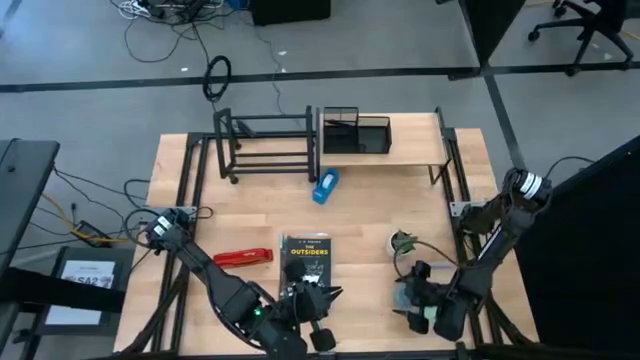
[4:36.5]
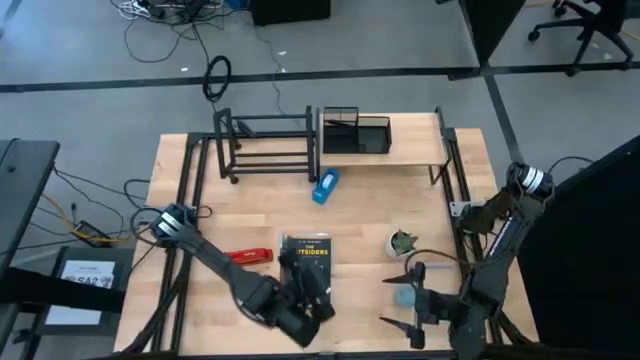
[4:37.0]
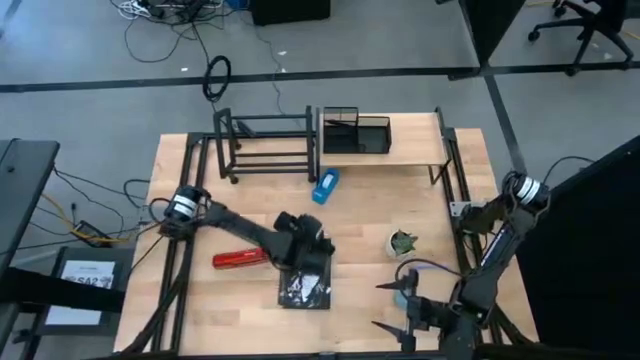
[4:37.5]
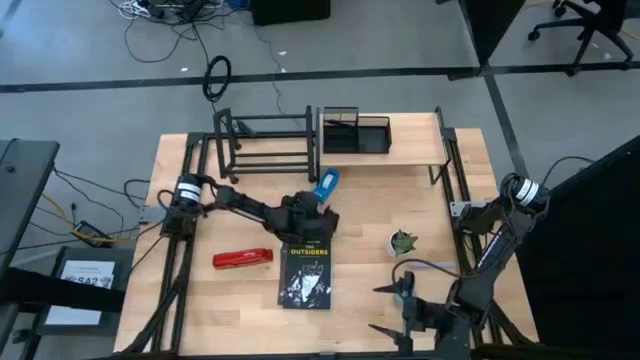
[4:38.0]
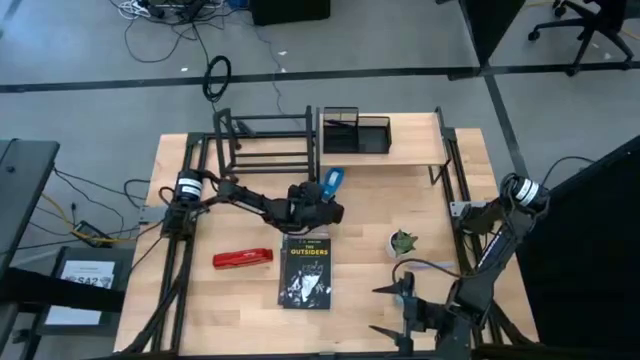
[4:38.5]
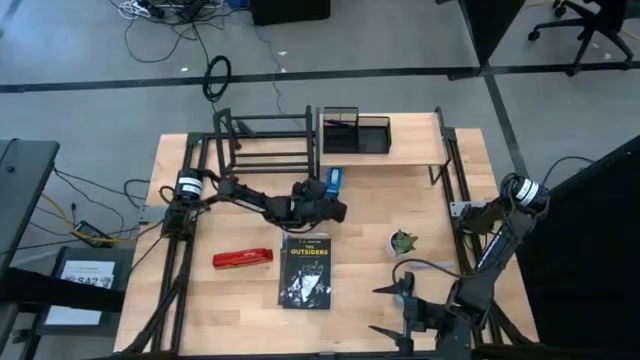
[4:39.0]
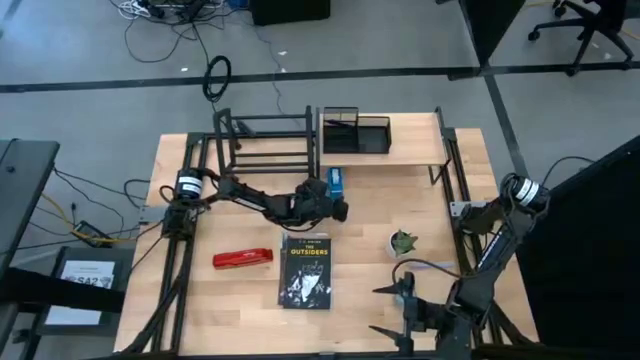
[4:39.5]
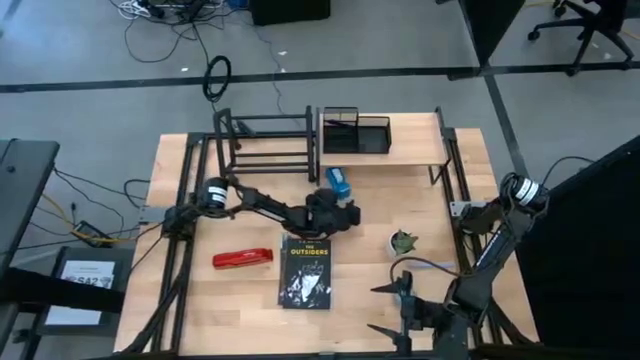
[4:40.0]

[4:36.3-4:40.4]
Task: Stock shelves
Remove the blue tape dispenser from under the shelf

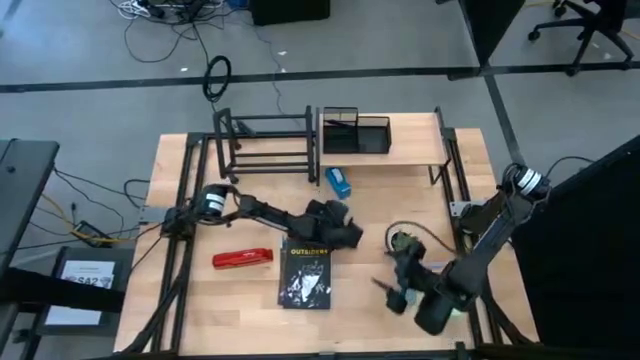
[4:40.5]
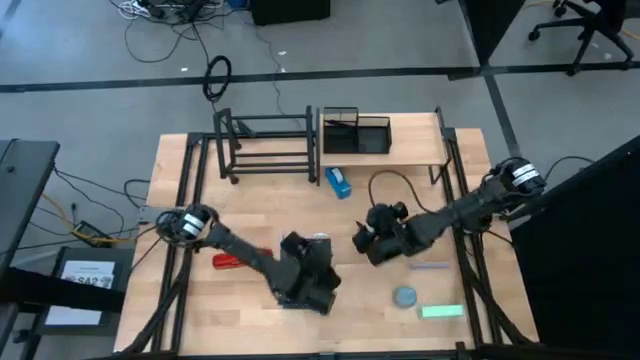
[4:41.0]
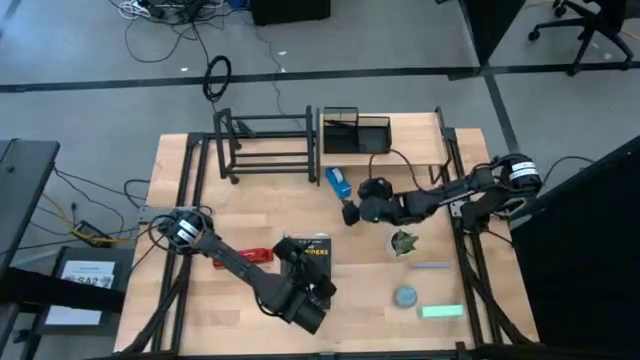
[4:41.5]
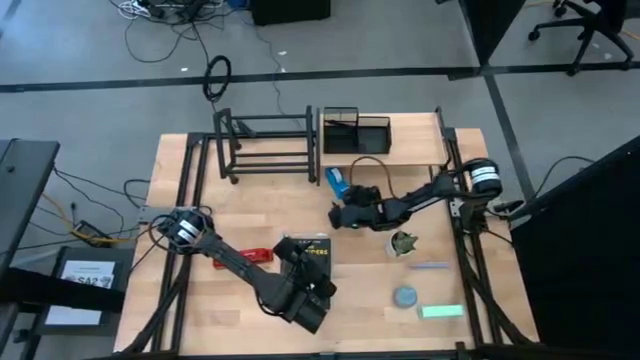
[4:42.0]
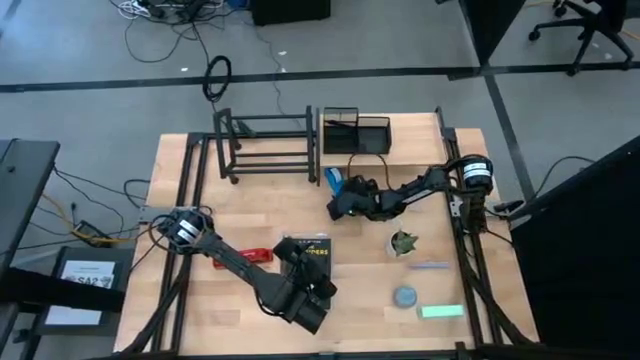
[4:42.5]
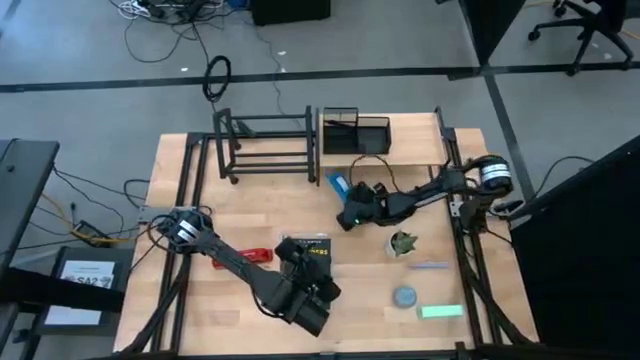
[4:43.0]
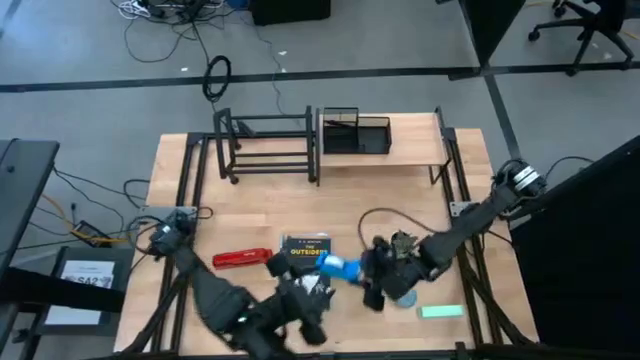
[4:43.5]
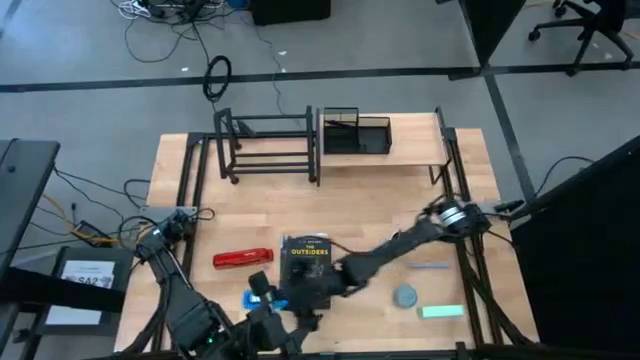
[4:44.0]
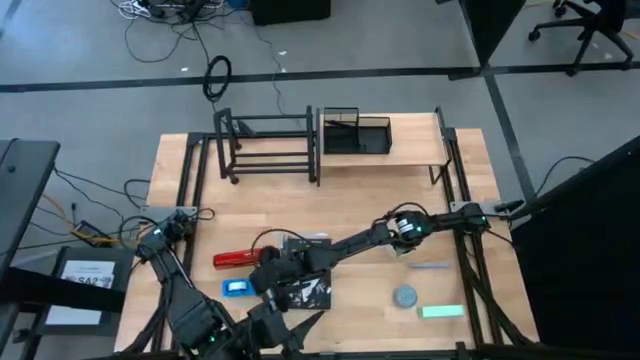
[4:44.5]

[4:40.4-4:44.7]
Remove the blue tape dispenser from under the shelf

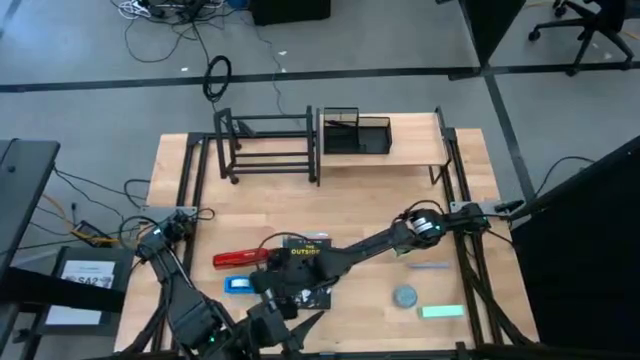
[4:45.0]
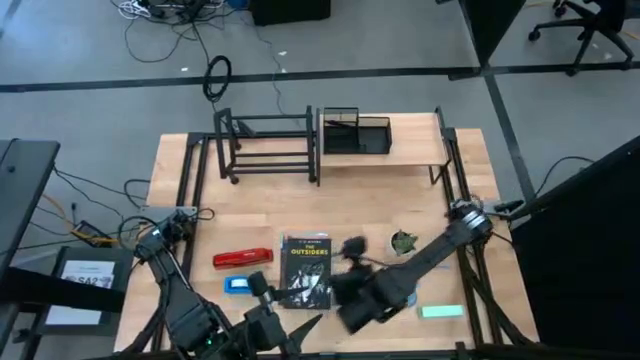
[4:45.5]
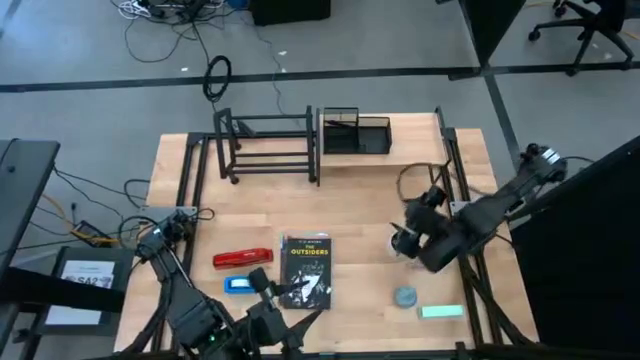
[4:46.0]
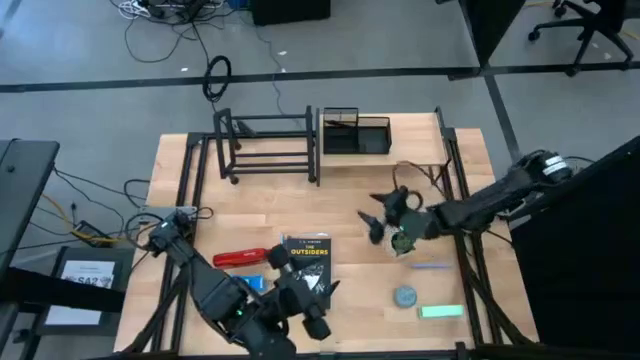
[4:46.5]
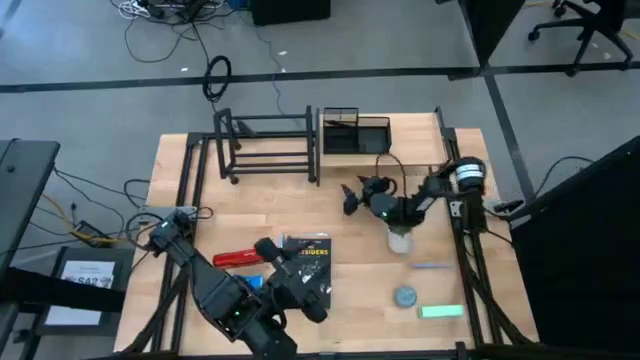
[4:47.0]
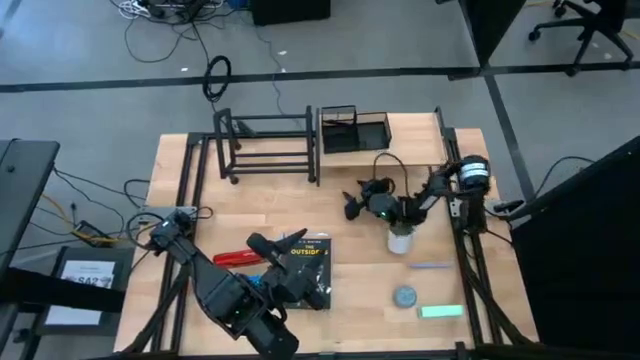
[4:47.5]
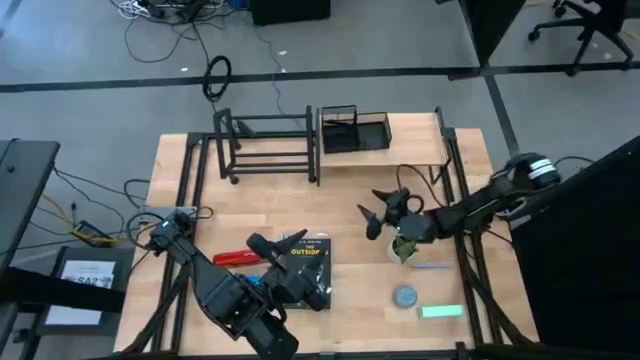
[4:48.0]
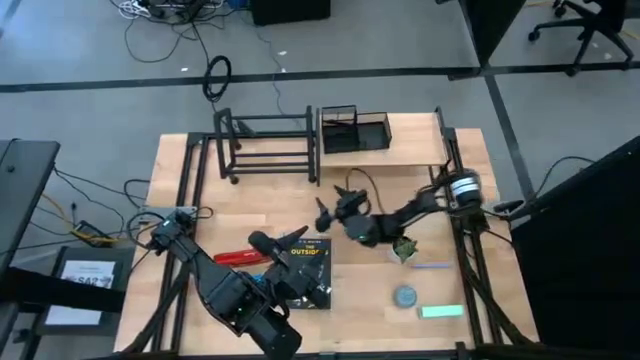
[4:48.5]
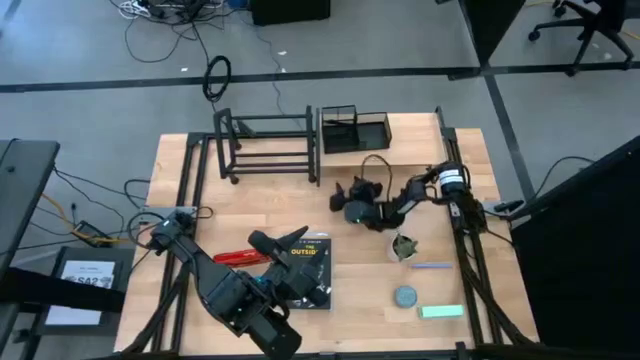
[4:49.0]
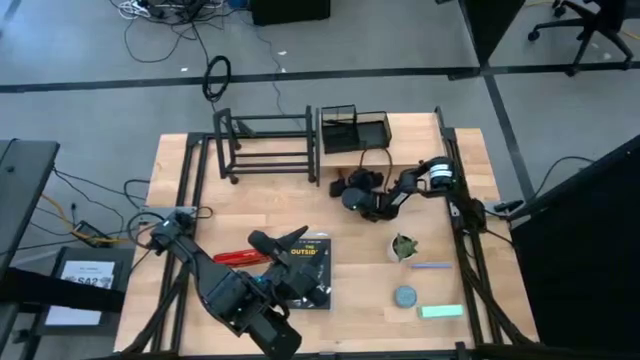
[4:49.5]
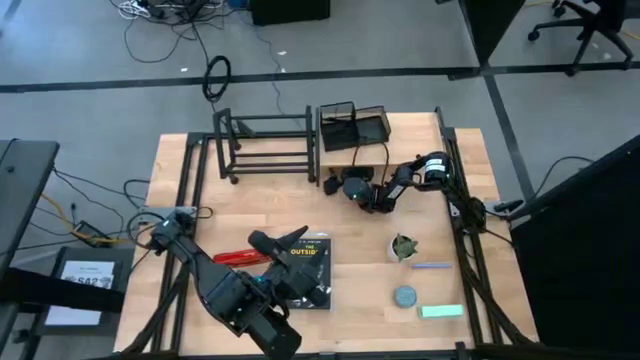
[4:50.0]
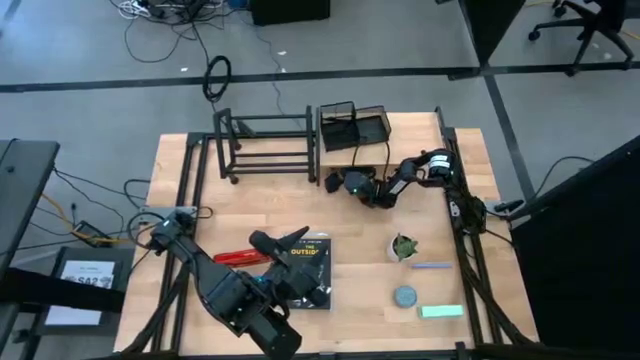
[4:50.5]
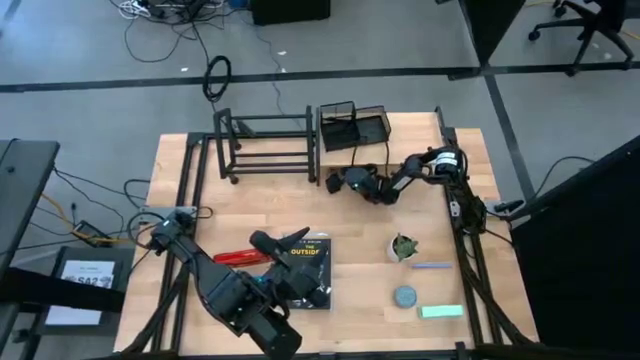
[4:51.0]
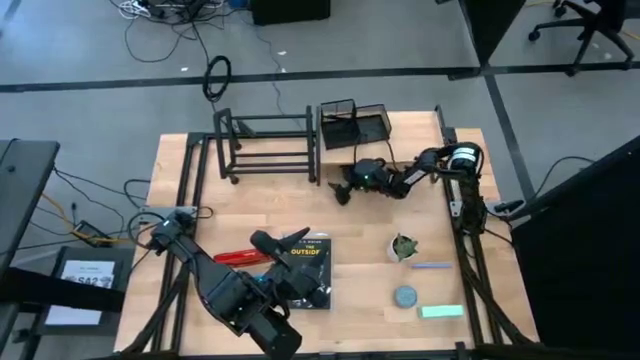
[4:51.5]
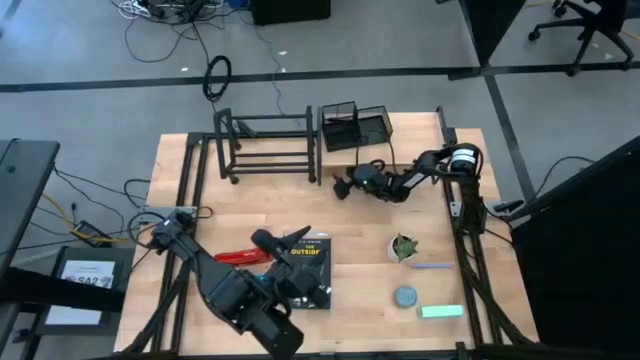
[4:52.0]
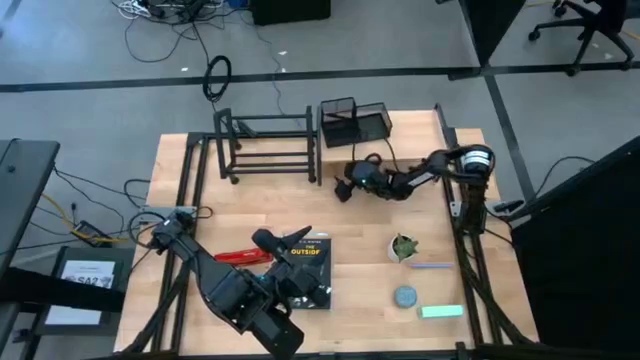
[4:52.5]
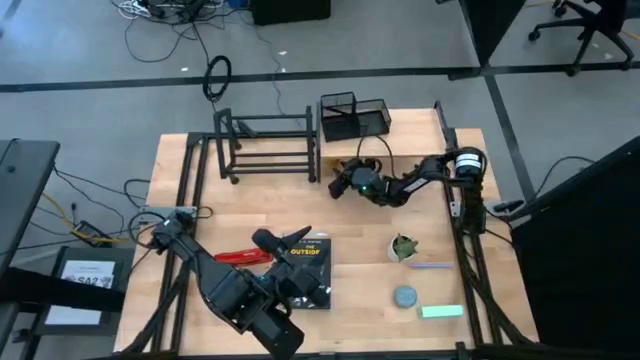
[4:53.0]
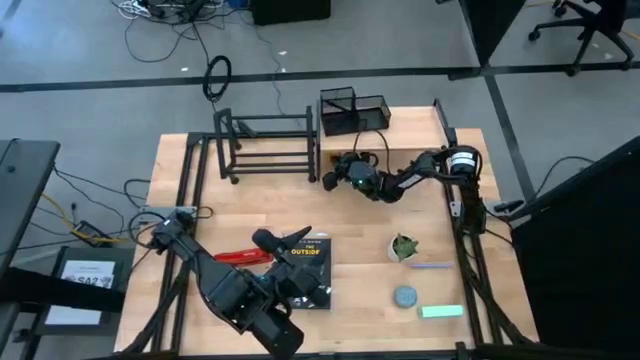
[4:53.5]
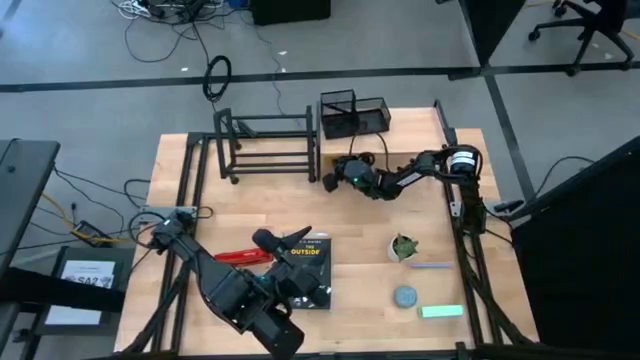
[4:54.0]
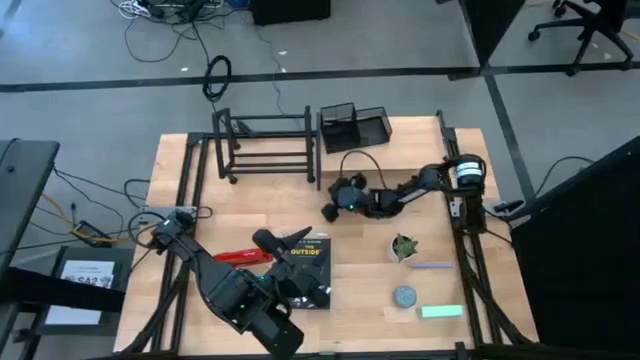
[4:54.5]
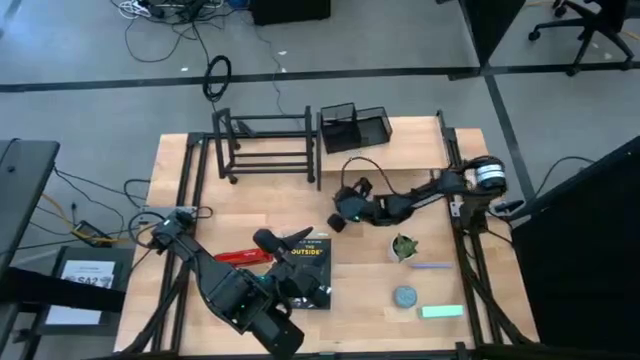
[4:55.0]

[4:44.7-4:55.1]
Remove the yellow scented candle from under the shelf

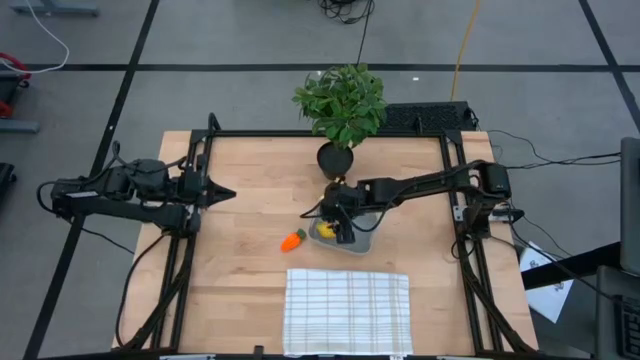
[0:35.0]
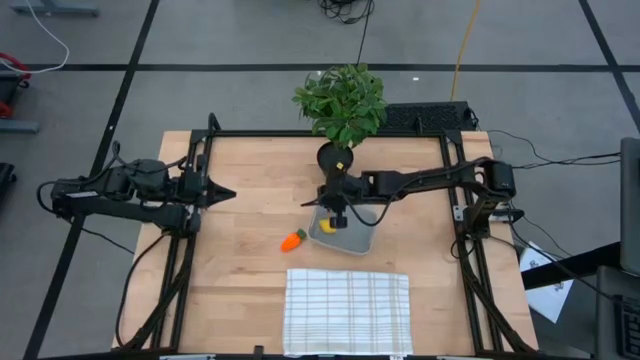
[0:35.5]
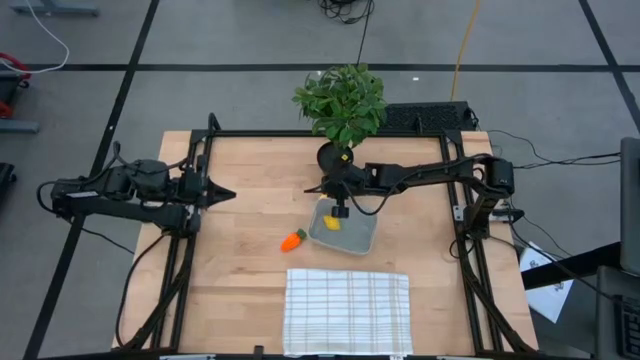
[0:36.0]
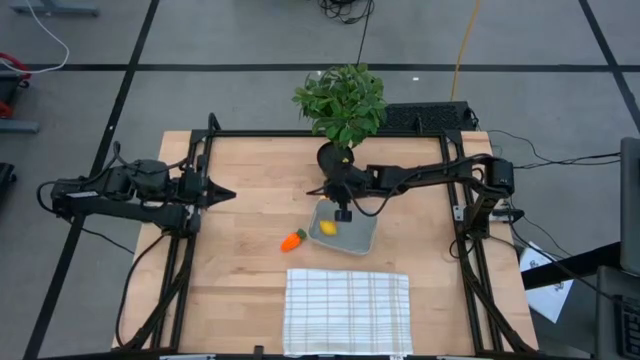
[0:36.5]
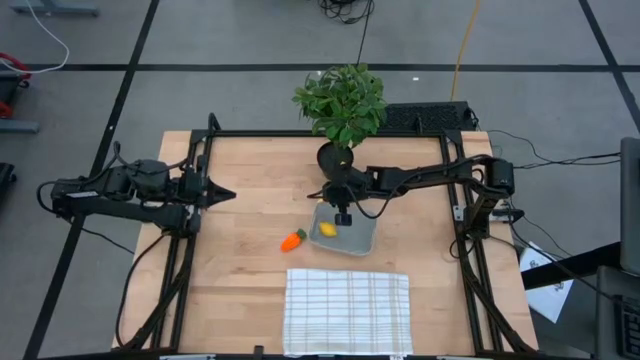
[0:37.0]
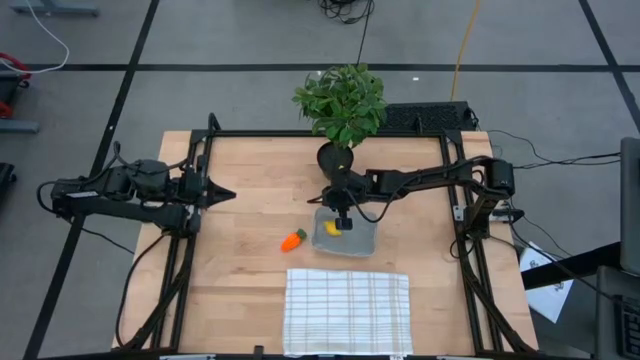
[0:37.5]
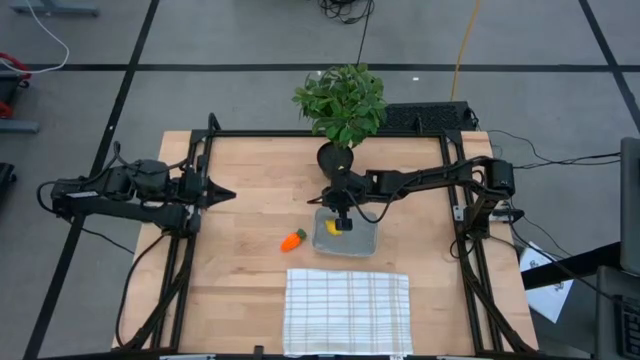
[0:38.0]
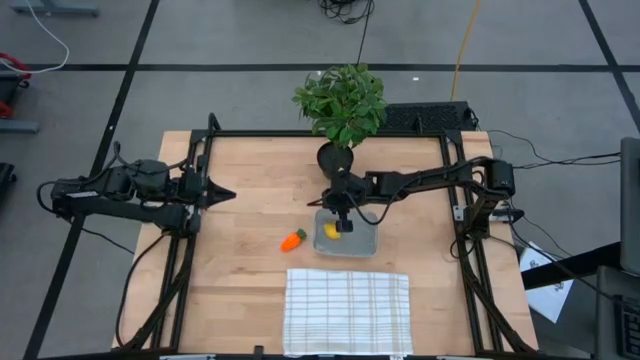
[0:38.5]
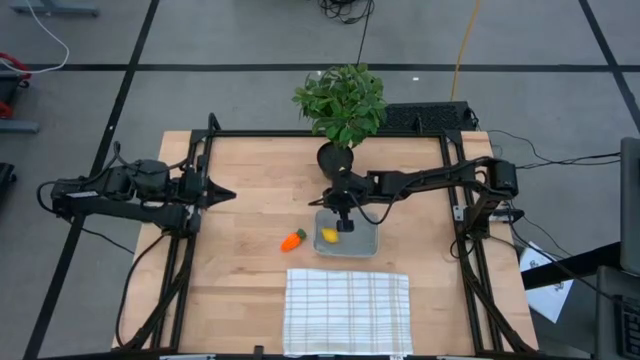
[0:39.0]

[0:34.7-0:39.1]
Task: Pick and placing Produce into tupperware
Adjust the gray bin on the table
